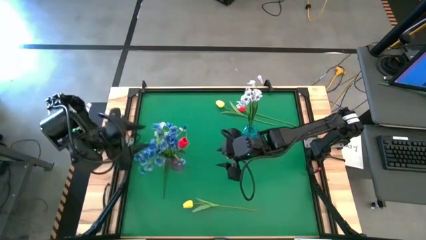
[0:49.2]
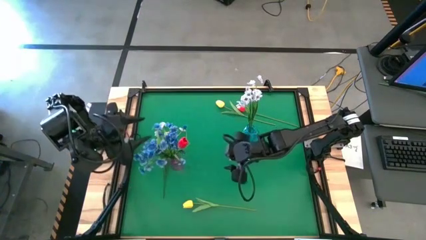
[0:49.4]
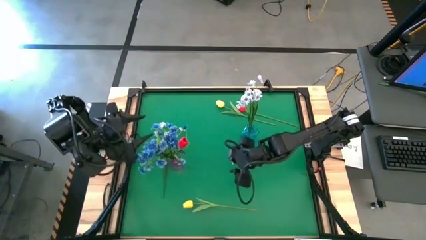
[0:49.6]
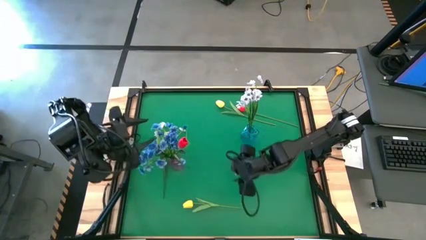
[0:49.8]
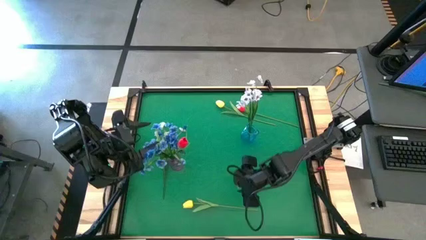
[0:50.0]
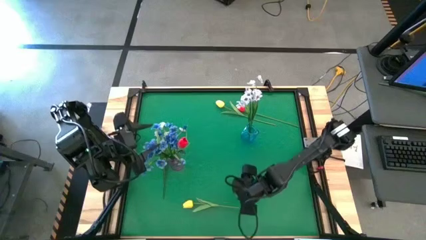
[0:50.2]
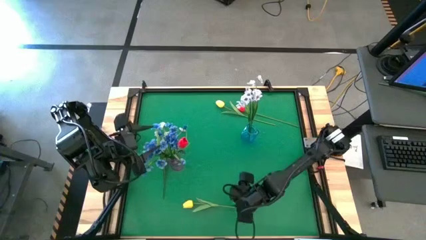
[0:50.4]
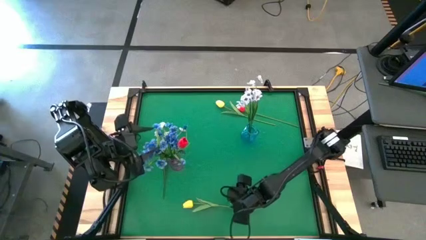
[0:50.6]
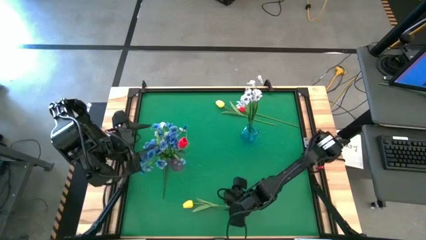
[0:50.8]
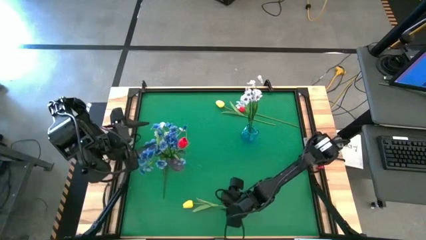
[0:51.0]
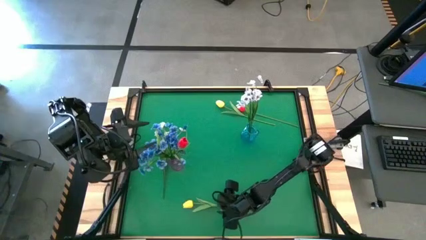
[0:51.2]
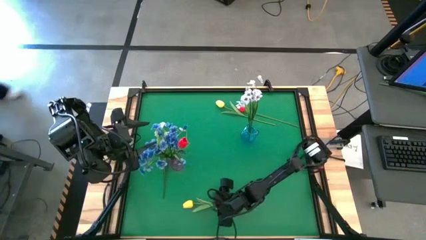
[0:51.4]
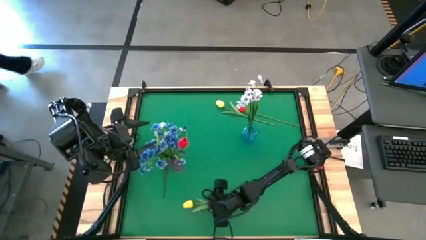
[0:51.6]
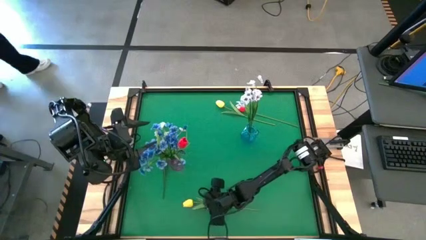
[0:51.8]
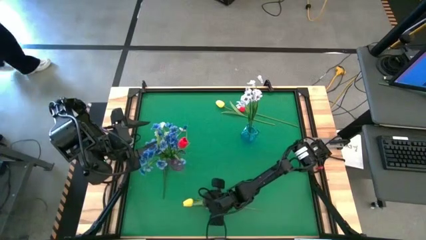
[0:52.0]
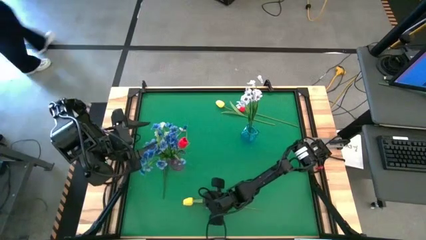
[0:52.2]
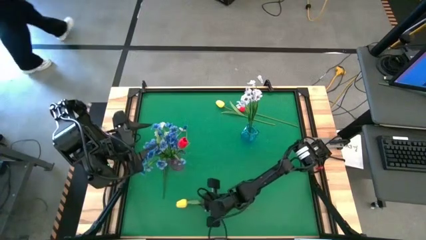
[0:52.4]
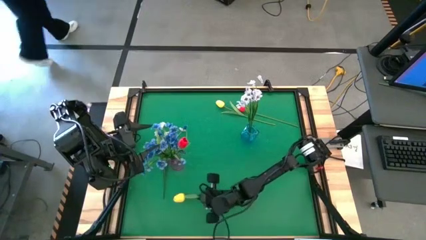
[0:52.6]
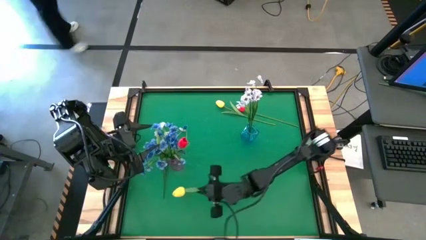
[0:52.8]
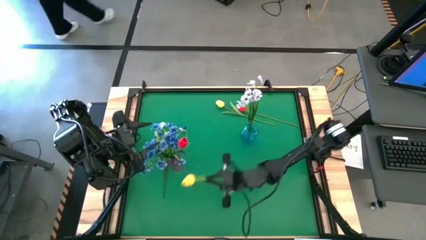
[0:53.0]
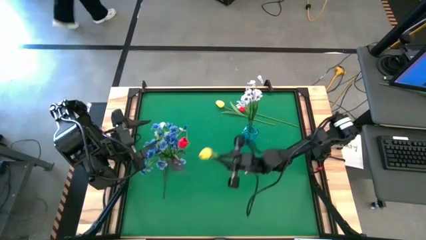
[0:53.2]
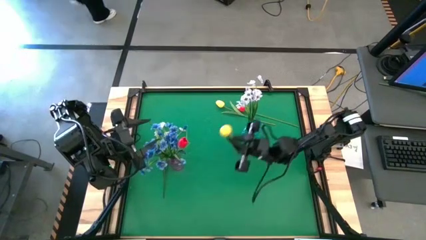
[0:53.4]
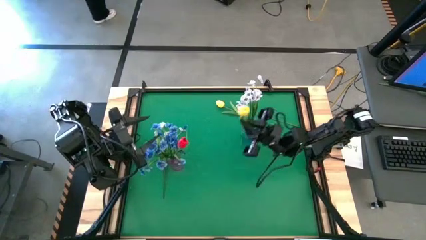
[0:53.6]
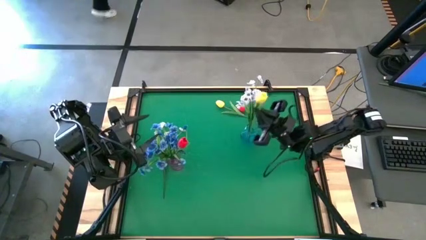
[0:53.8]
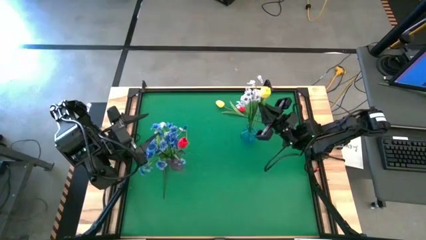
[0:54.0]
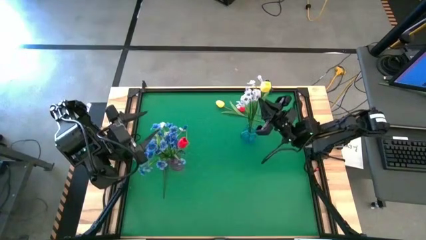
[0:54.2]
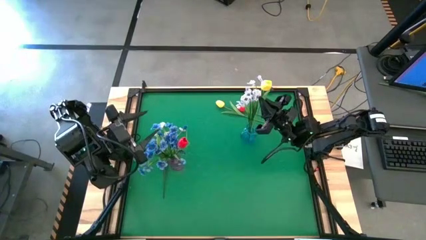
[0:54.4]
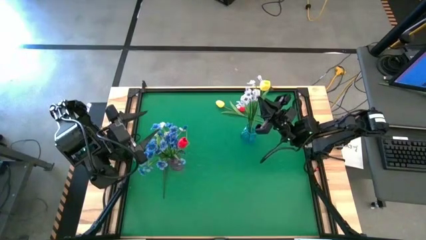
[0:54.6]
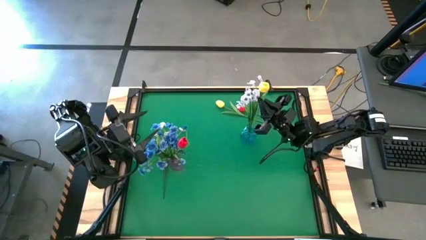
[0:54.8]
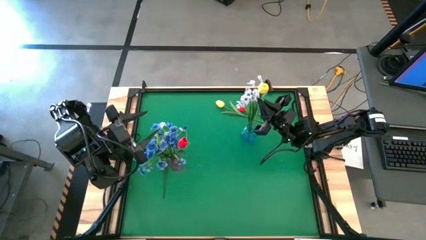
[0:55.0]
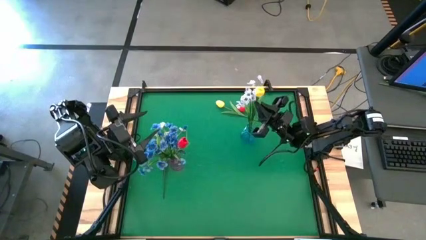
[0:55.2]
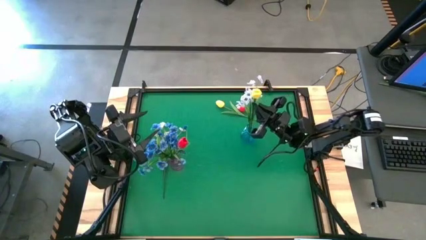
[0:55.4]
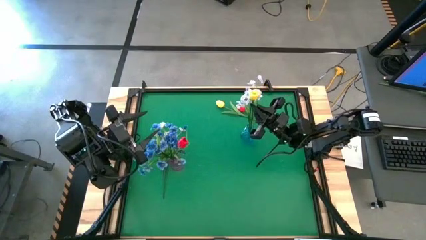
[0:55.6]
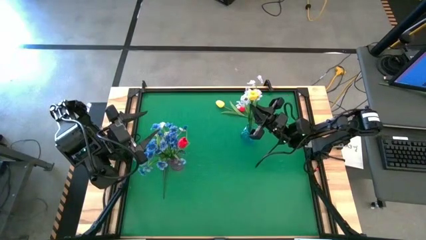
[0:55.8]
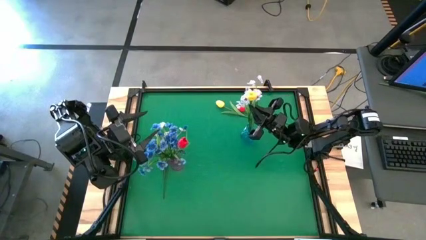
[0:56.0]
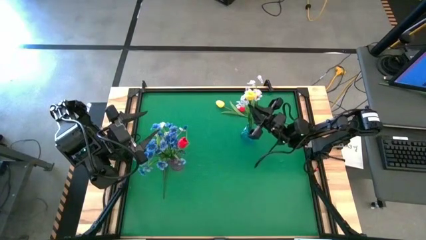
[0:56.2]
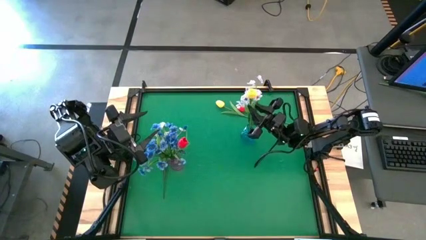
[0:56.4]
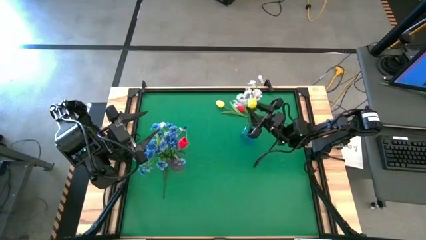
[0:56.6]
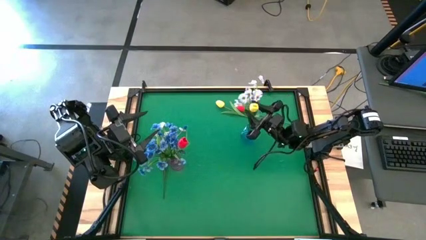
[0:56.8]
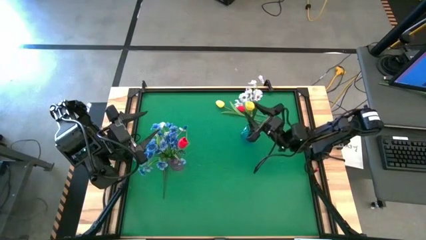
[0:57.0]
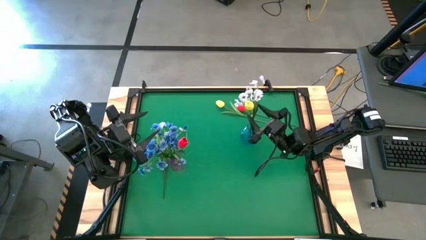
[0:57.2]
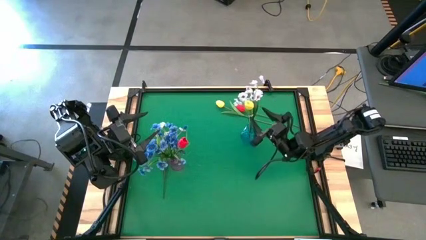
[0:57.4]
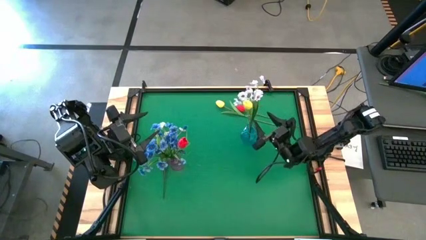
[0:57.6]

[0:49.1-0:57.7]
Task: Sort flowers into vase by color
Put the bottom yellow tulip into the blue vase
